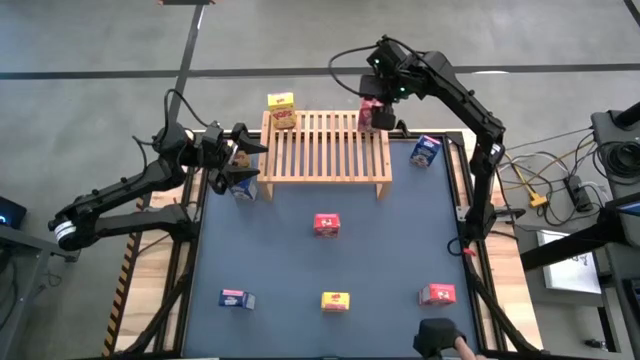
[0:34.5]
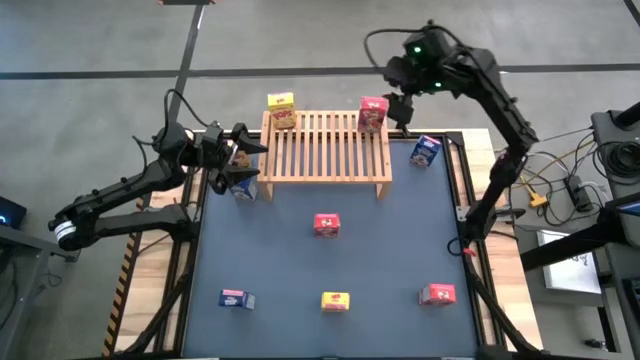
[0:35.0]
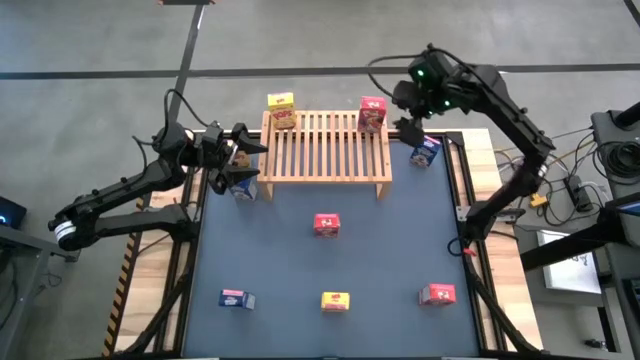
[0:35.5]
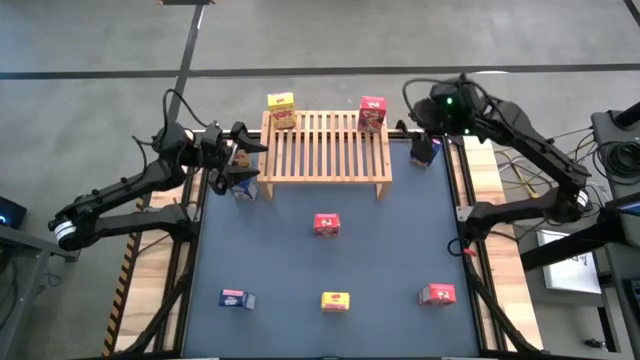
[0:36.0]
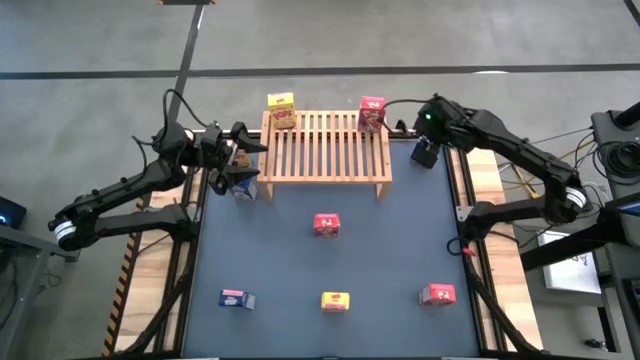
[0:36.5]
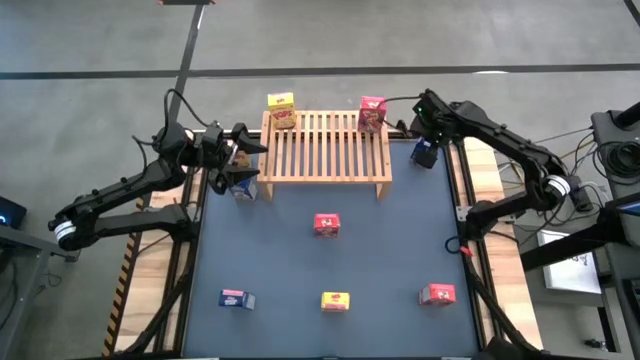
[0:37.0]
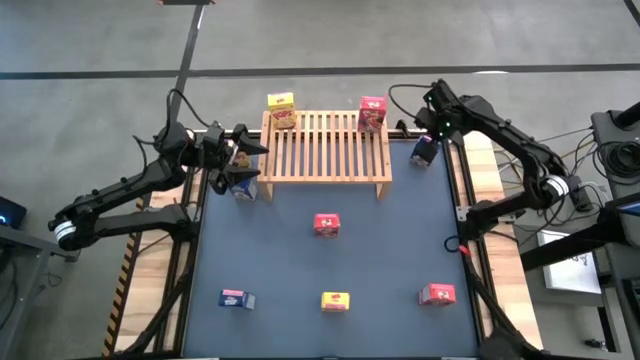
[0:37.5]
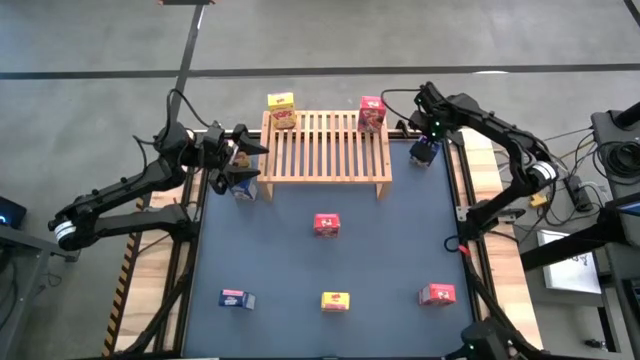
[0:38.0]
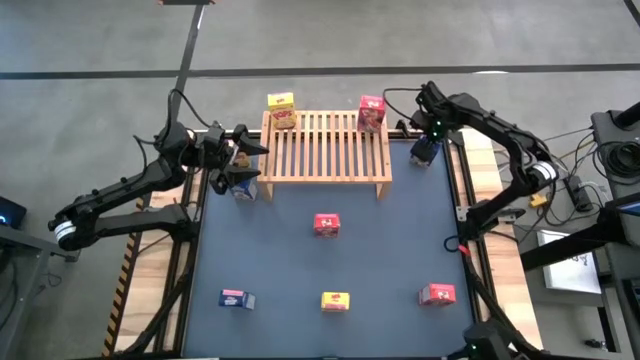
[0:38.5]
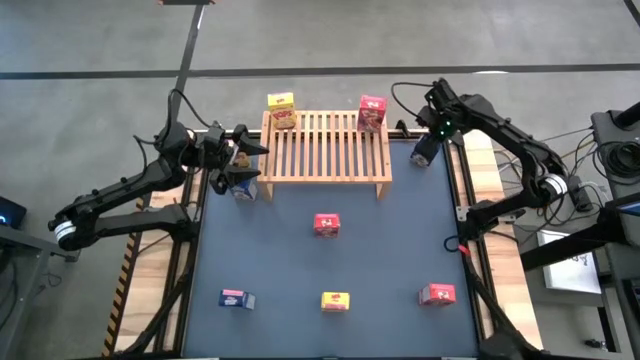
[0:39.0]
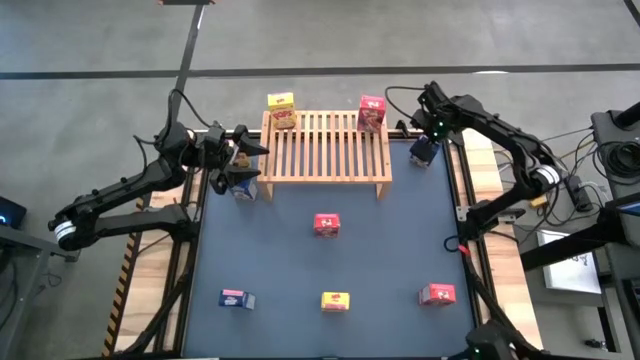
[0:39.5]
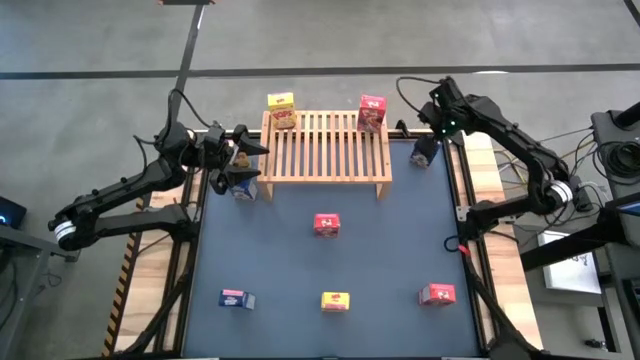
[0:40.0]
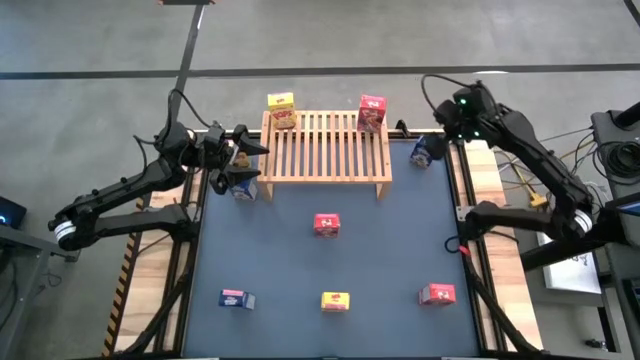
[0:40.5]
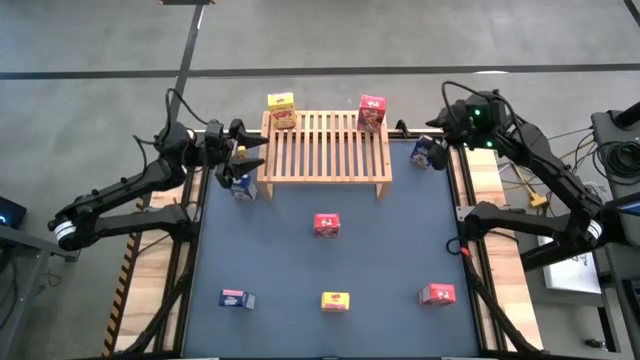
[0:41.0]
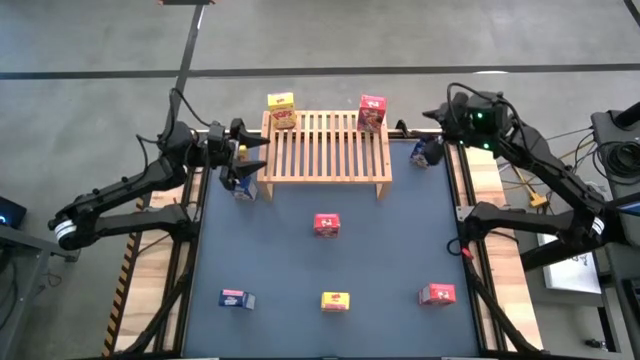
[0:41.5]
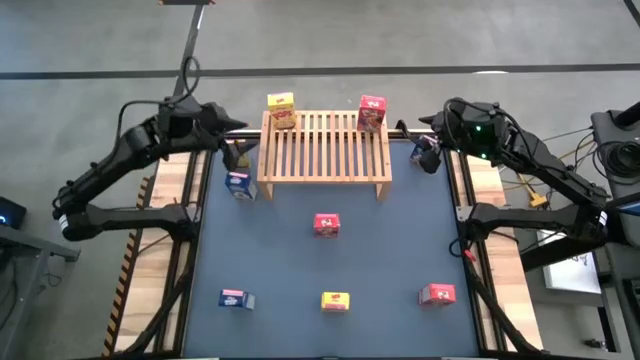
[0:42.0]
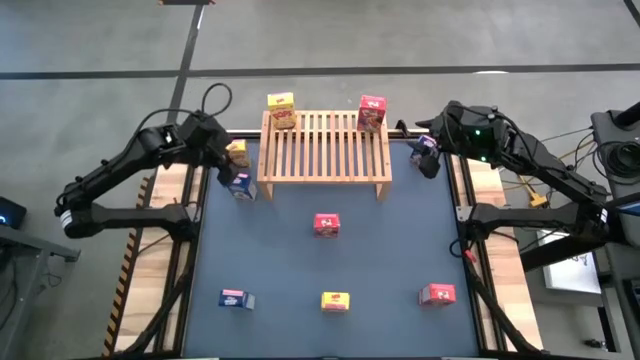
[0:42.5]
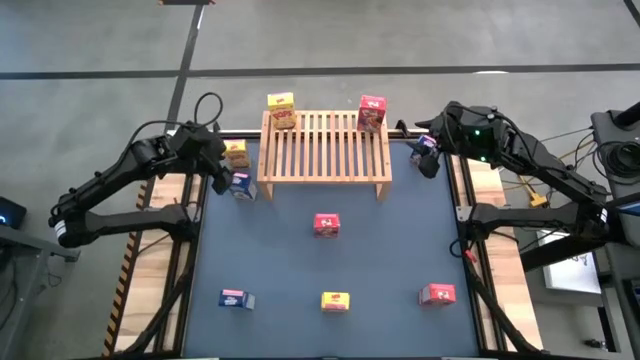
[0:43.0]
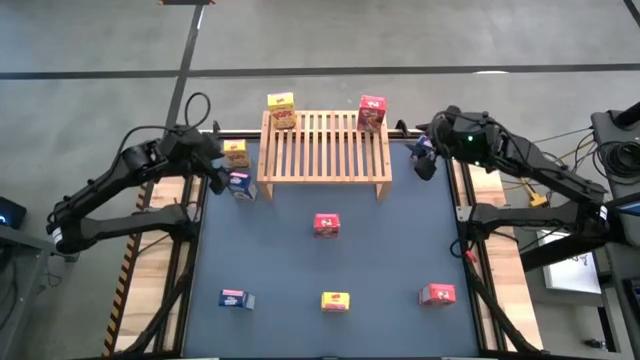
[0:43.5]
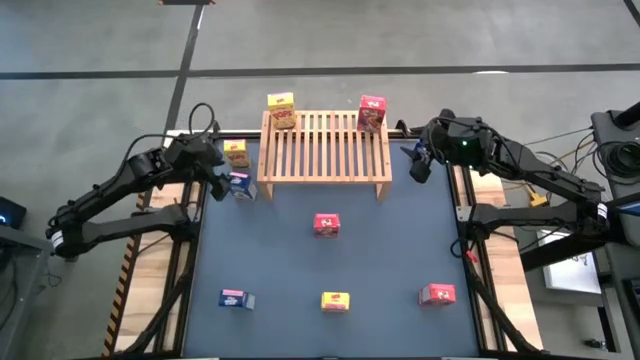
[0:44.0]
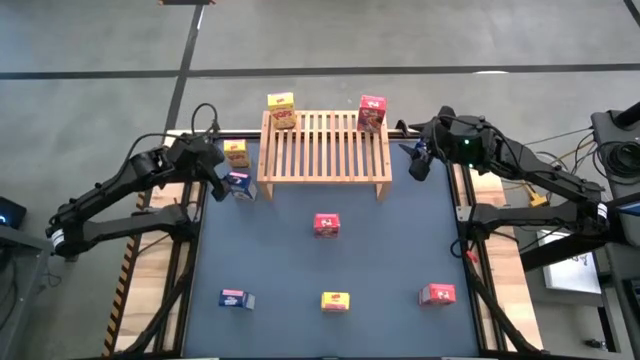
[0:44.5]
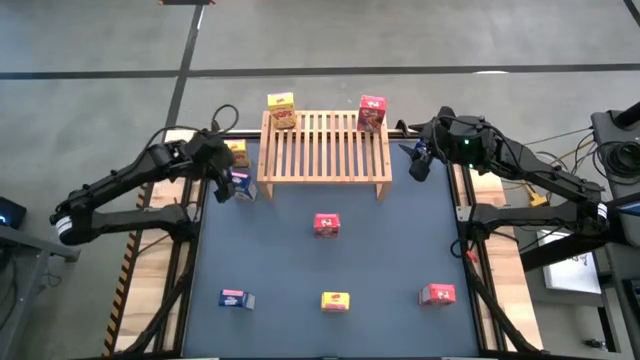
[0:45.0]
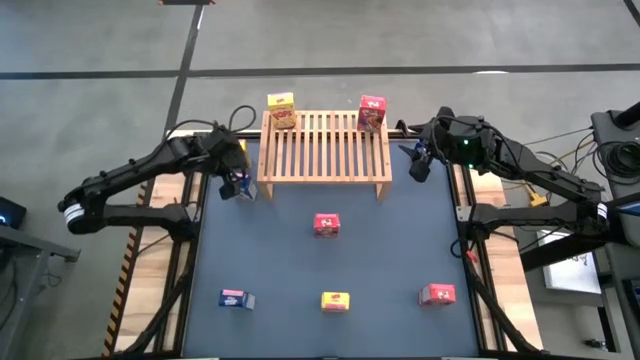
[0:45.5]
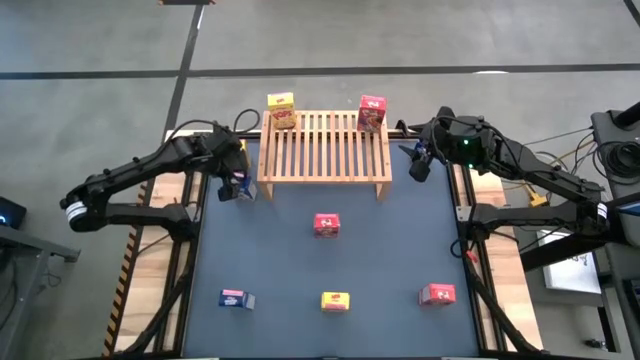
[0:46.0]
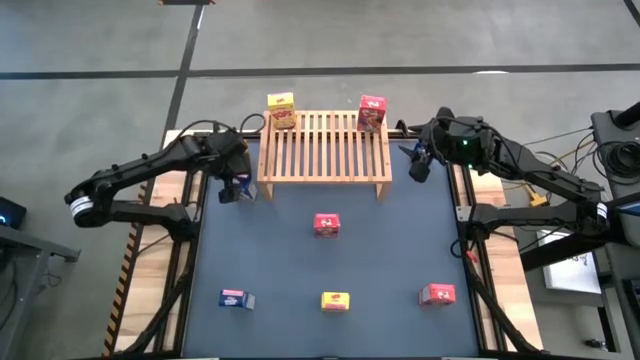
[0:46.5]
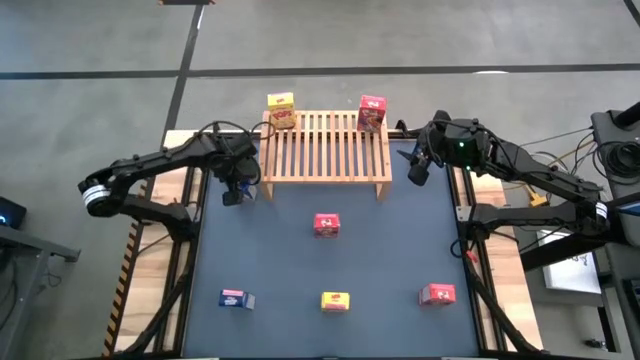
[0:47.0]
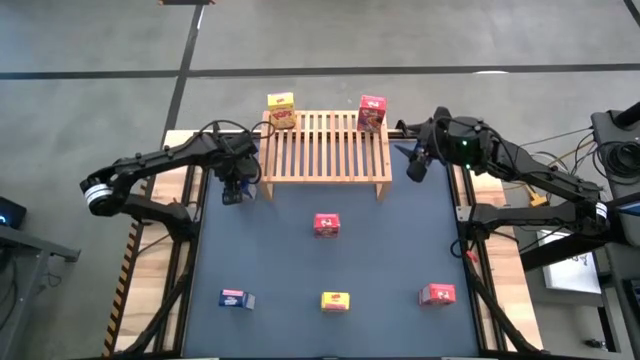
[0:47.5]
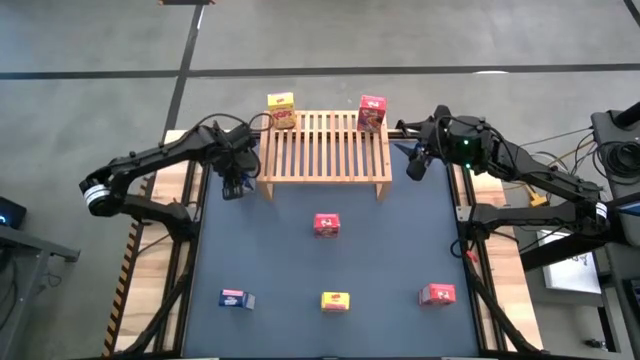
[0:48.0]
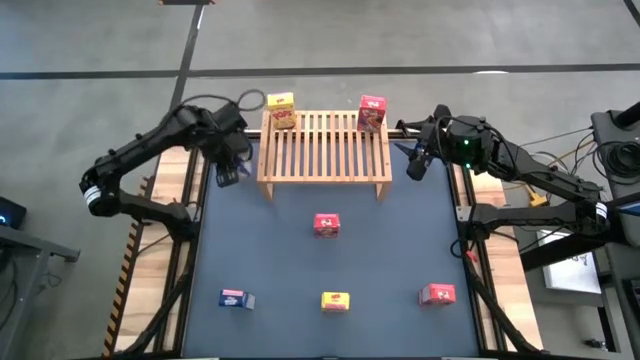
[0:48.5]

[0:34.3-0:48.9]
Task: Stack cereal on shelf
Put the top left blue cereal box on the shelf

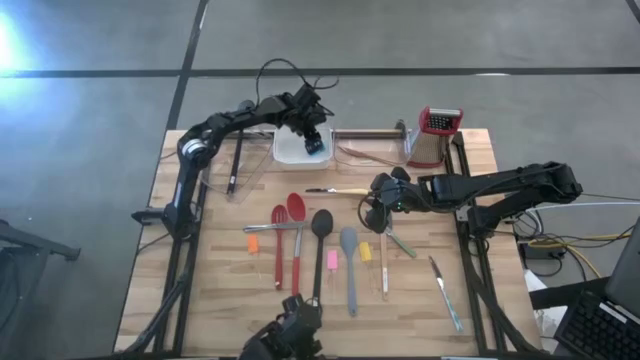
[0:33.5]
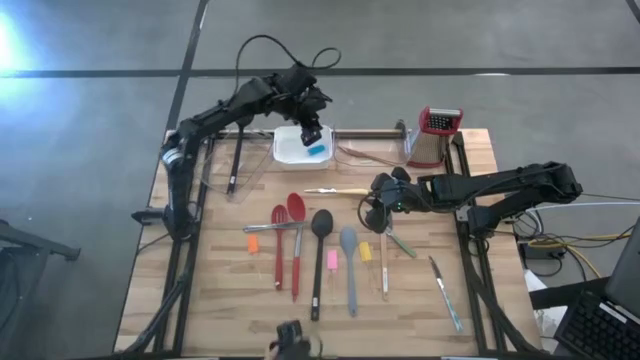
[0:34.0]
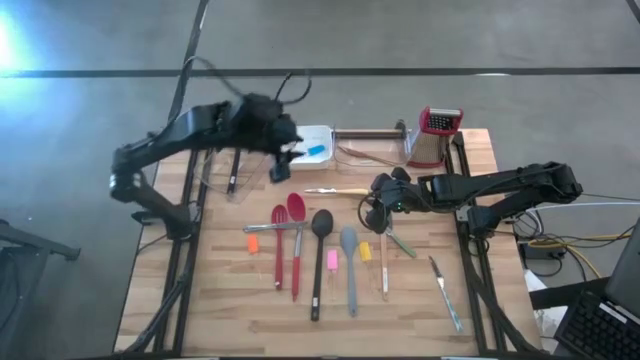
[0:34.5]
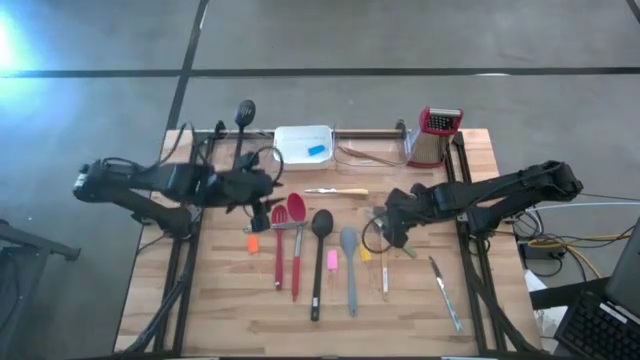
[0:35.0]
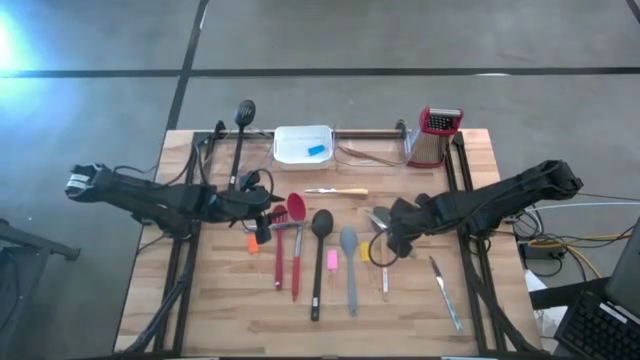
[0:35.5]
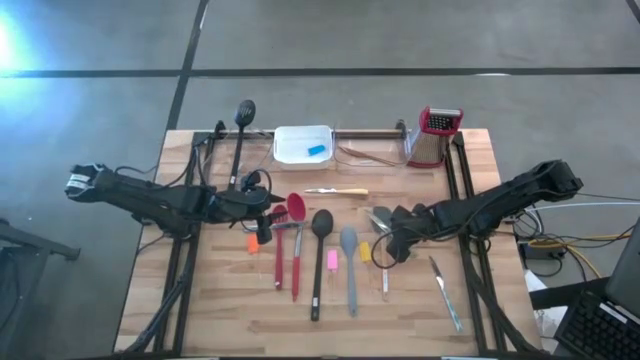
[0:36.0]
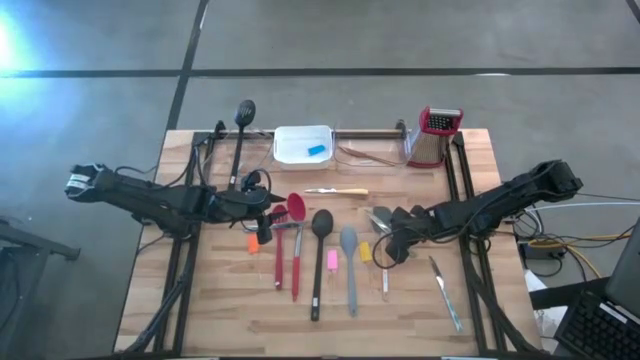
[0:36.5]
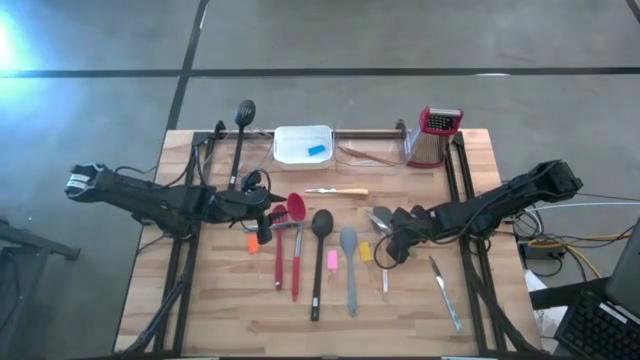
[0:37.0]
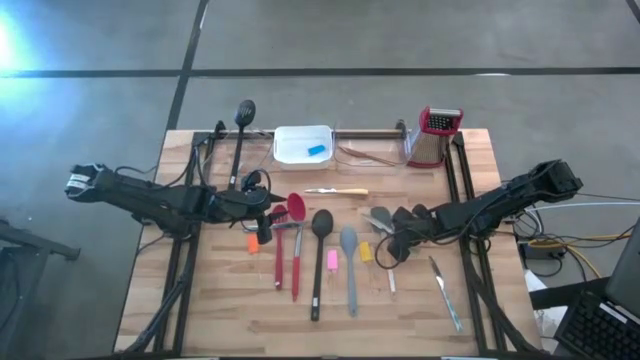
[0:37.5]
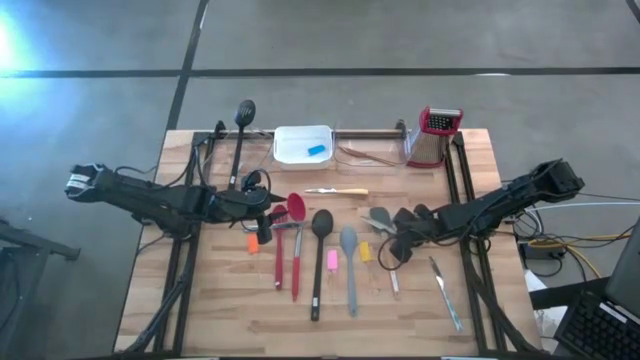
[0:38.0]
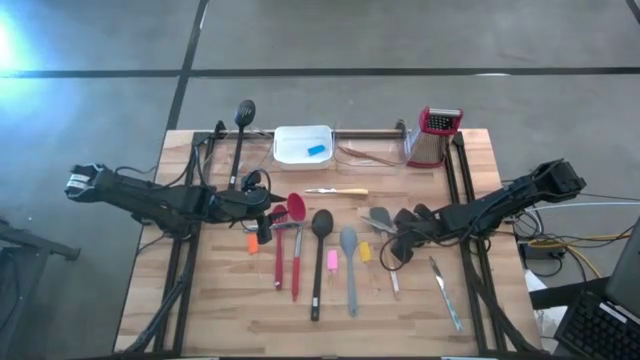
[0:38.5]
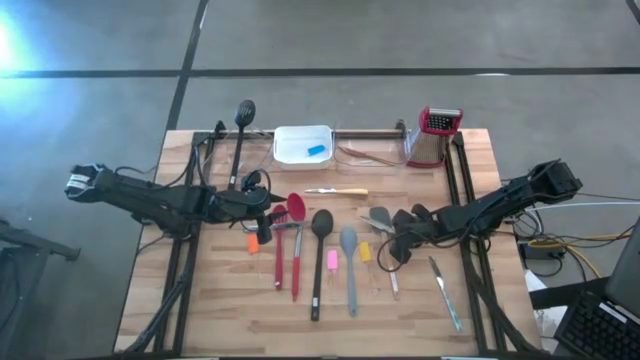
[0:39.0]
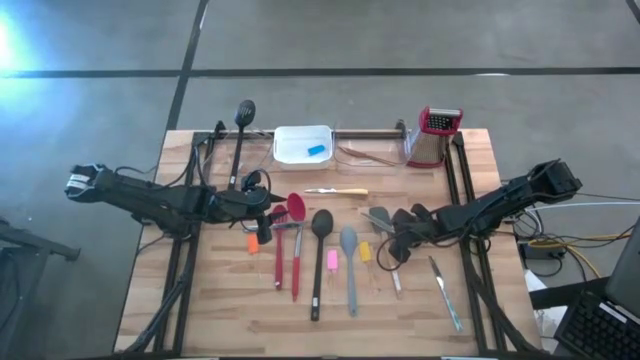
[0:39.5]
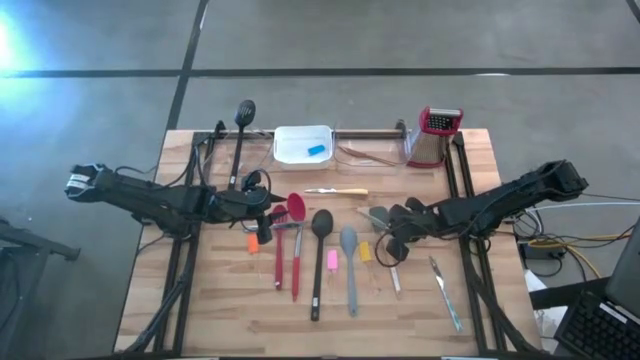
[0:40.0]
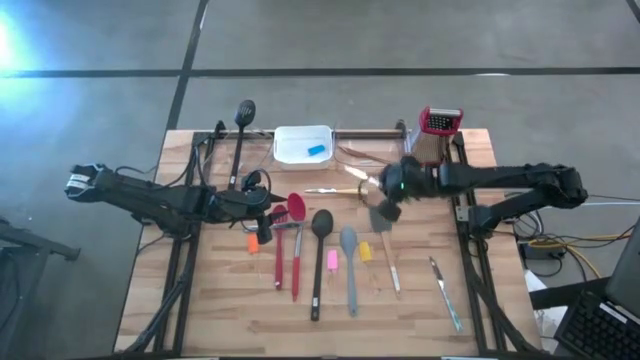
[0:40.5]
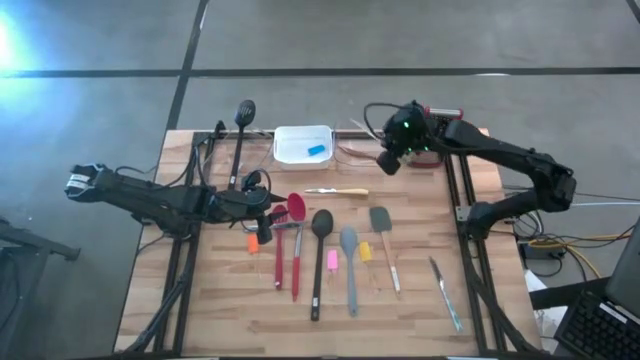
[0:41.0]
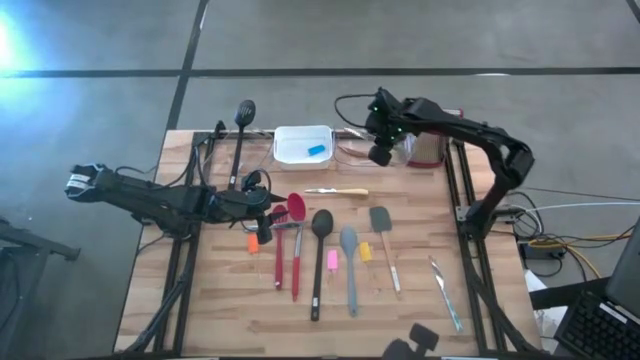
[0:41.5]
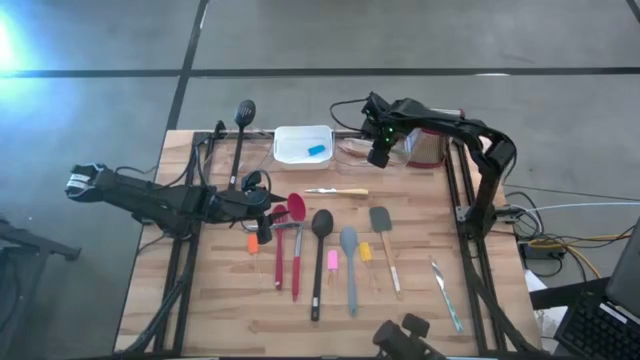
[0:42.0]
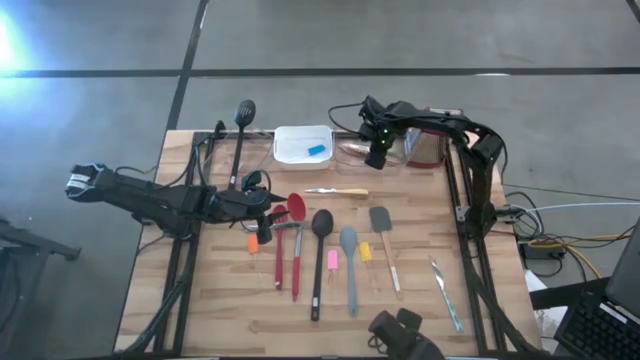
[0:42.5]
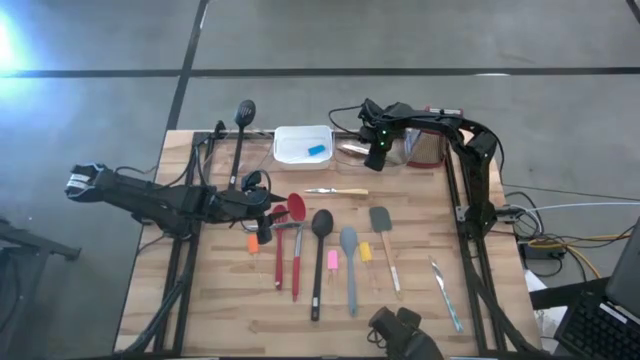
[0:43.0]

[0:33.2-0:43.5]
Task: Pick & Place Kitchen Items
Put the green knife into the right transparent bin
